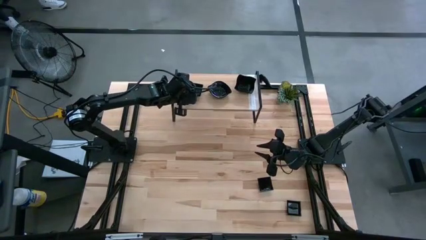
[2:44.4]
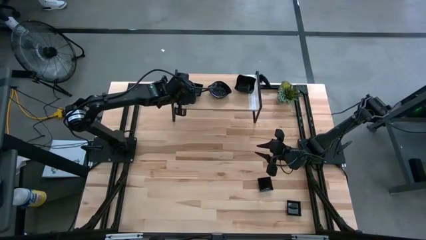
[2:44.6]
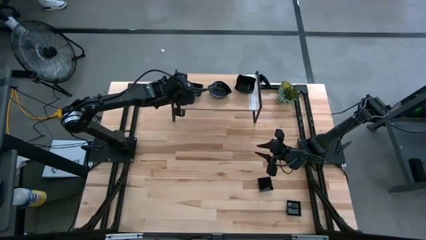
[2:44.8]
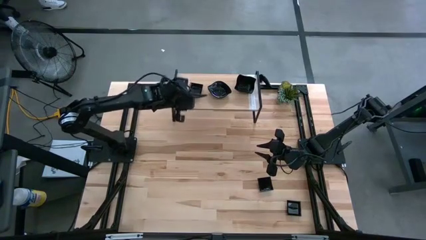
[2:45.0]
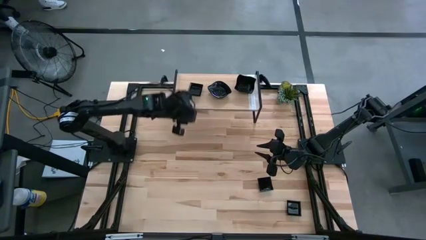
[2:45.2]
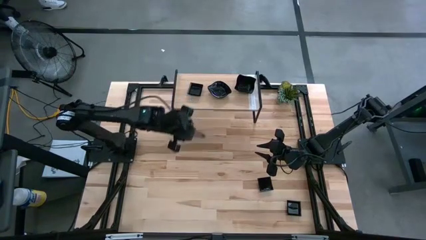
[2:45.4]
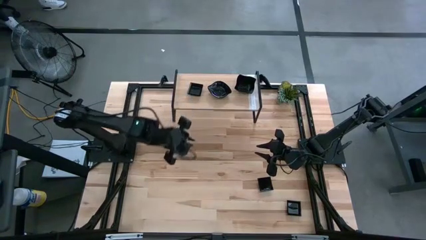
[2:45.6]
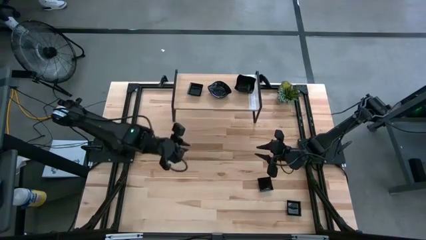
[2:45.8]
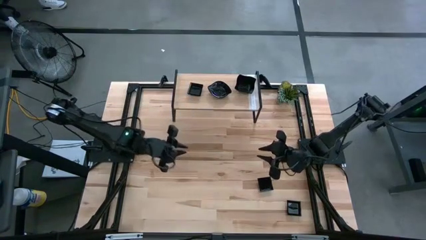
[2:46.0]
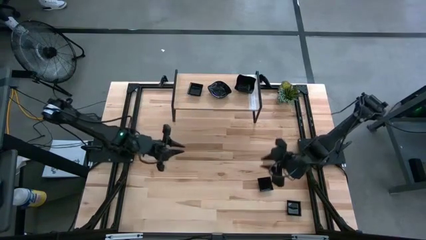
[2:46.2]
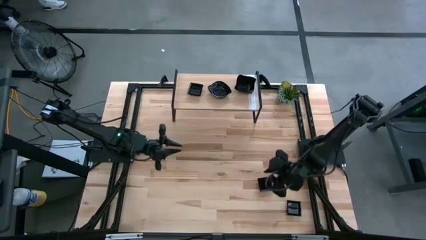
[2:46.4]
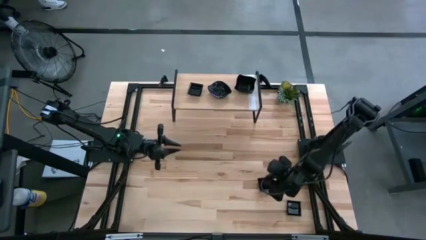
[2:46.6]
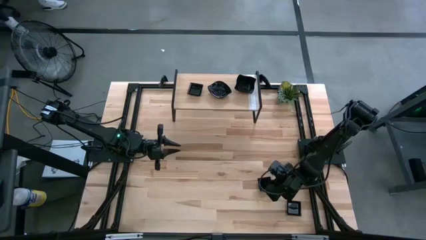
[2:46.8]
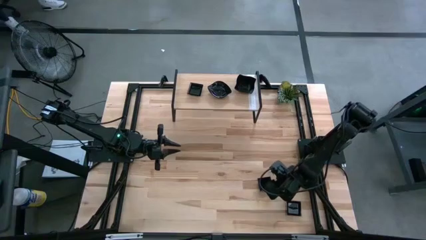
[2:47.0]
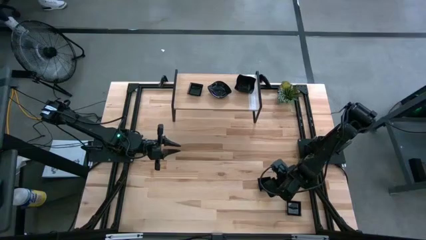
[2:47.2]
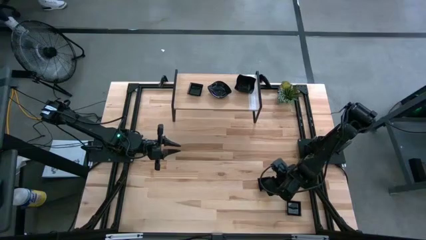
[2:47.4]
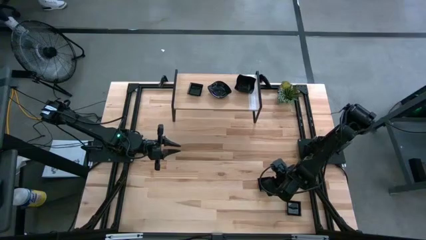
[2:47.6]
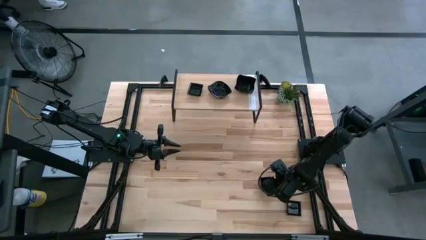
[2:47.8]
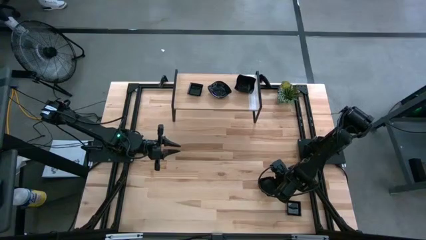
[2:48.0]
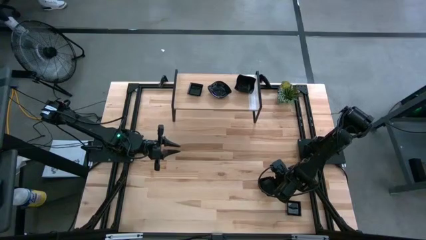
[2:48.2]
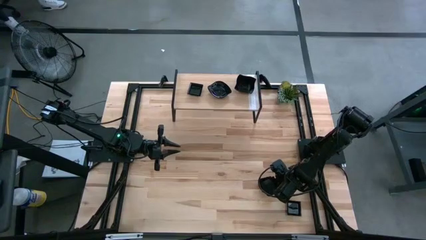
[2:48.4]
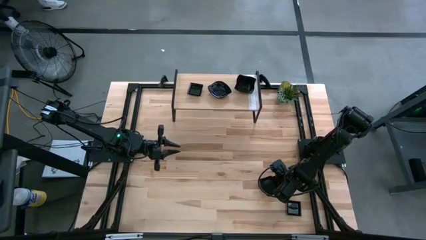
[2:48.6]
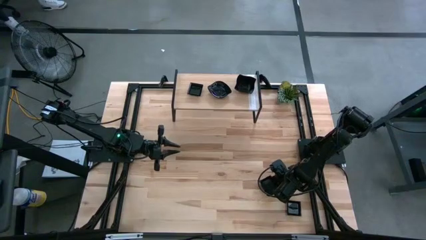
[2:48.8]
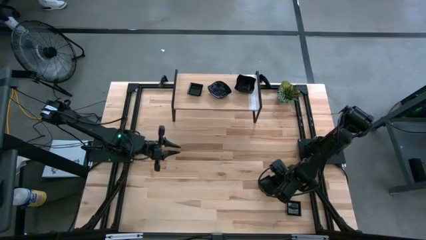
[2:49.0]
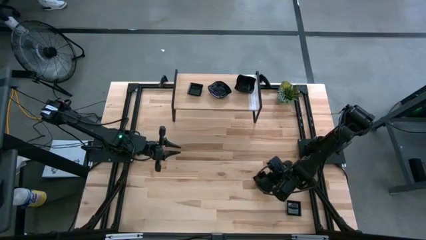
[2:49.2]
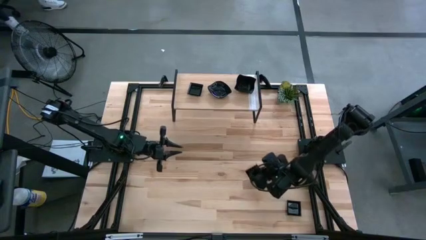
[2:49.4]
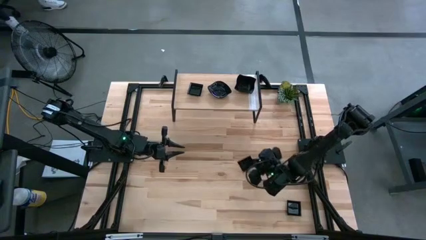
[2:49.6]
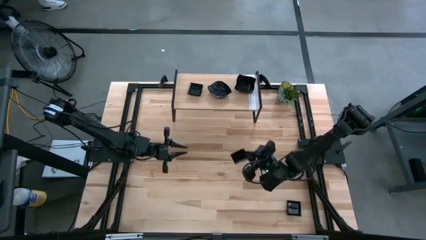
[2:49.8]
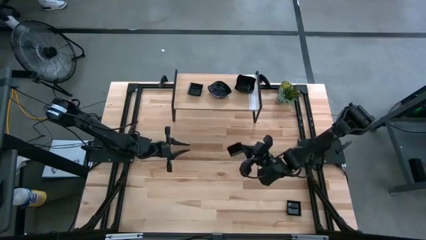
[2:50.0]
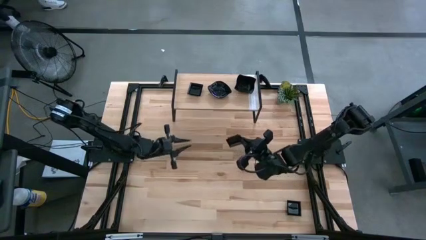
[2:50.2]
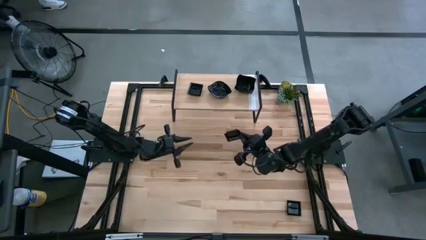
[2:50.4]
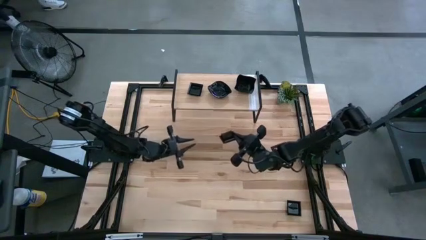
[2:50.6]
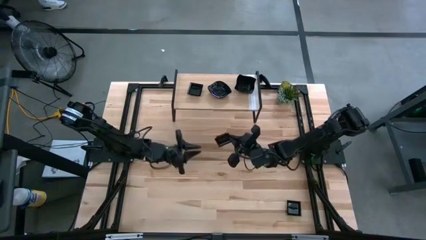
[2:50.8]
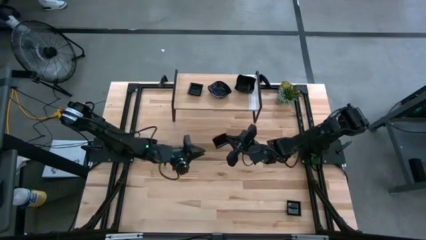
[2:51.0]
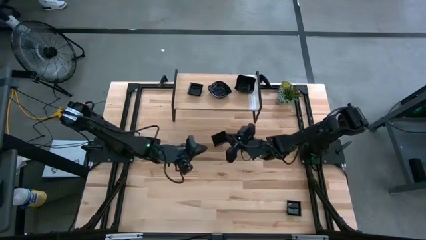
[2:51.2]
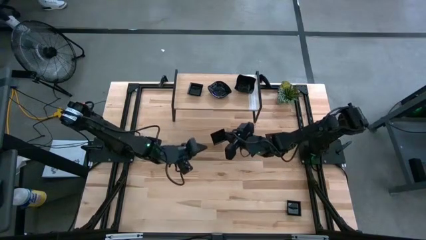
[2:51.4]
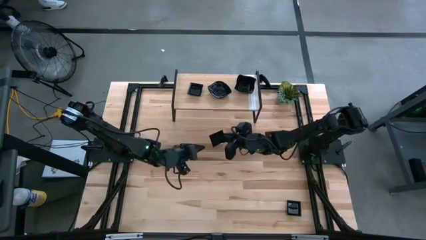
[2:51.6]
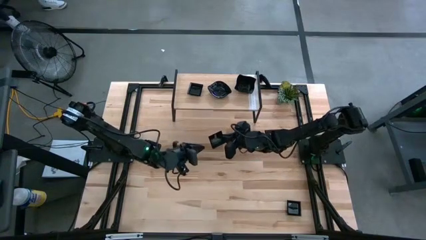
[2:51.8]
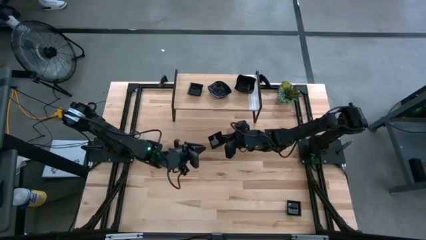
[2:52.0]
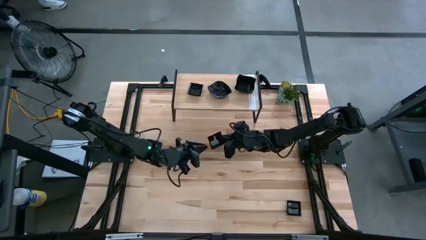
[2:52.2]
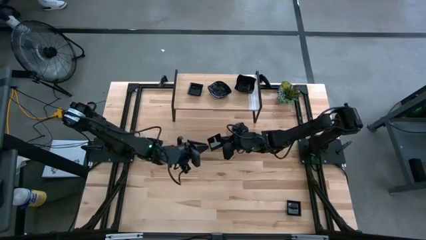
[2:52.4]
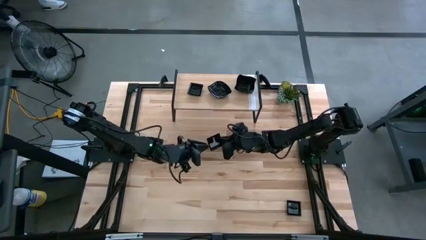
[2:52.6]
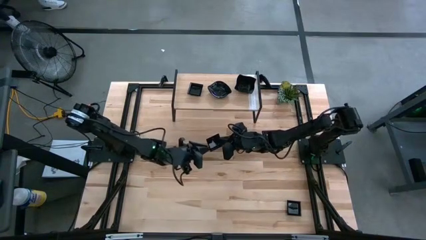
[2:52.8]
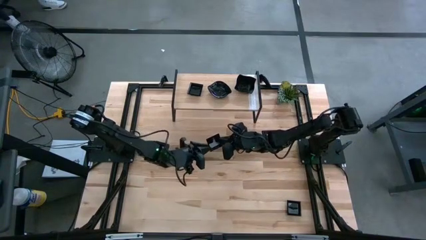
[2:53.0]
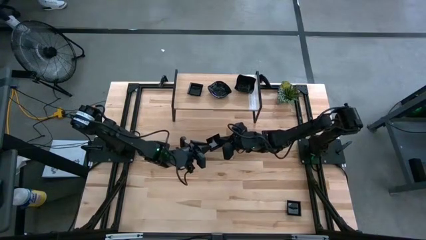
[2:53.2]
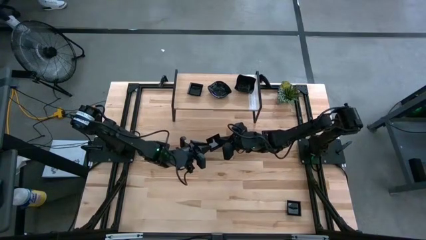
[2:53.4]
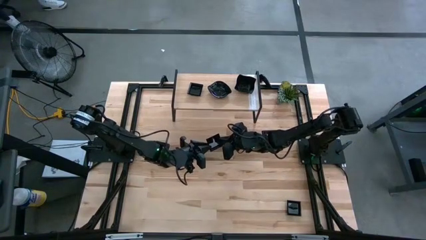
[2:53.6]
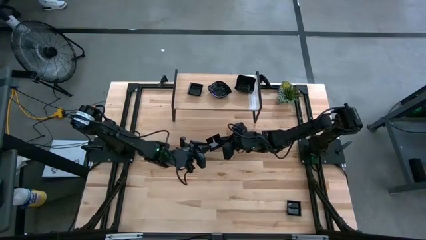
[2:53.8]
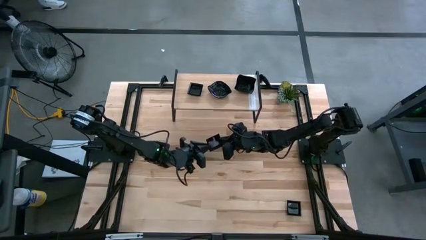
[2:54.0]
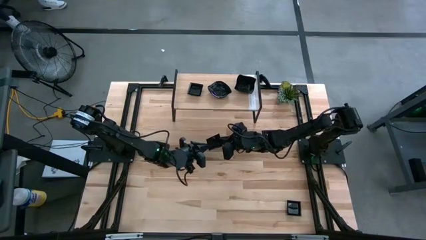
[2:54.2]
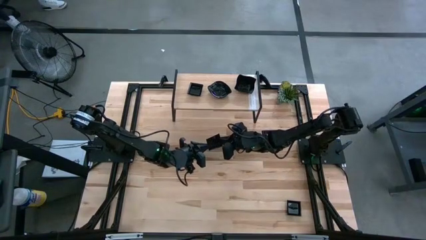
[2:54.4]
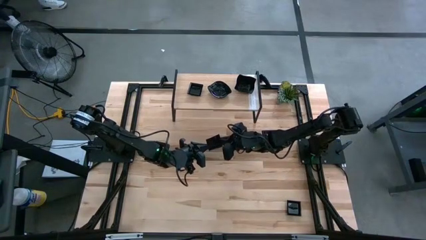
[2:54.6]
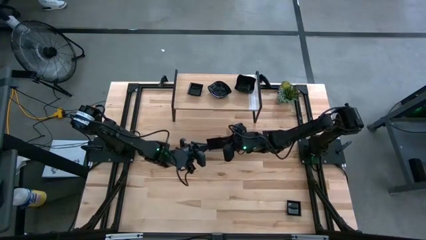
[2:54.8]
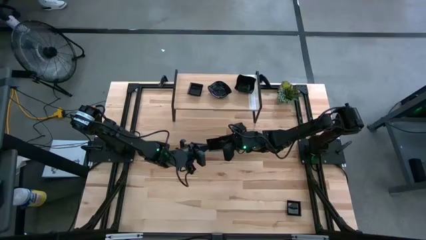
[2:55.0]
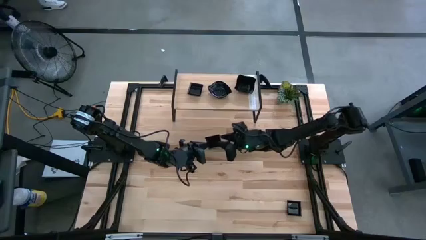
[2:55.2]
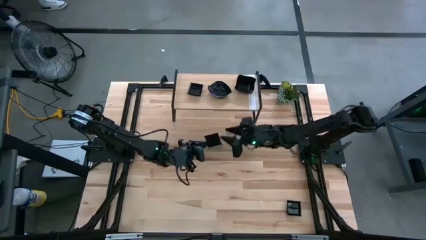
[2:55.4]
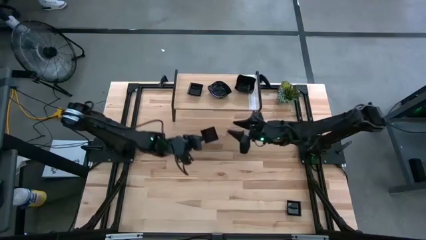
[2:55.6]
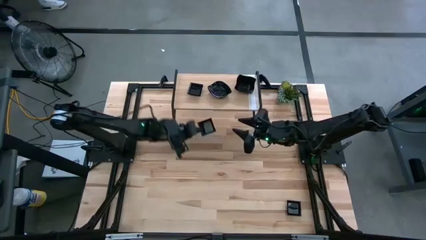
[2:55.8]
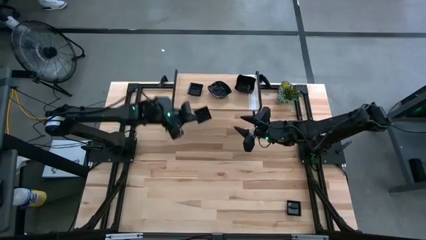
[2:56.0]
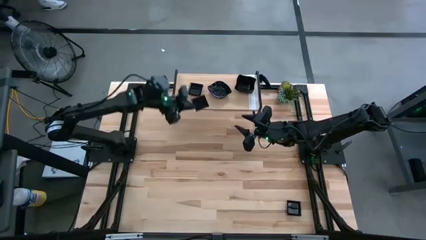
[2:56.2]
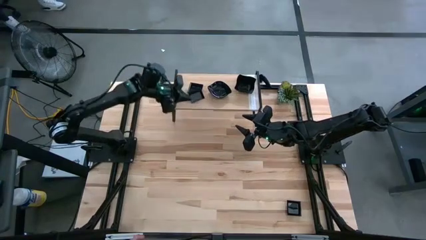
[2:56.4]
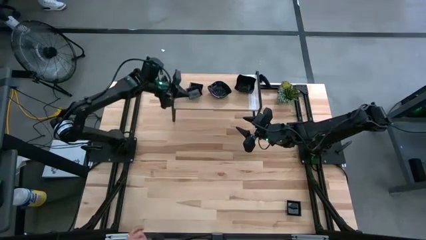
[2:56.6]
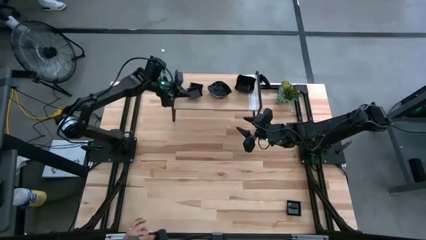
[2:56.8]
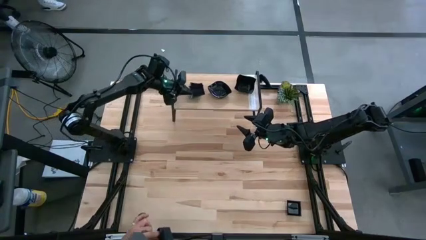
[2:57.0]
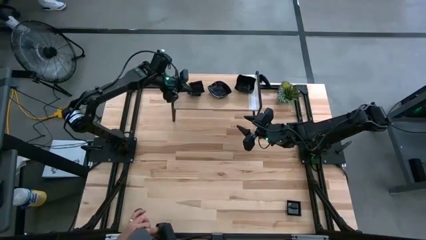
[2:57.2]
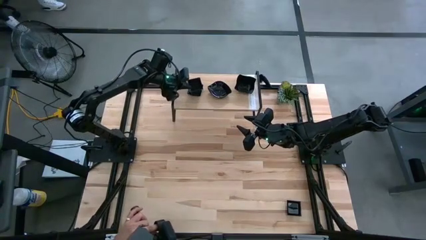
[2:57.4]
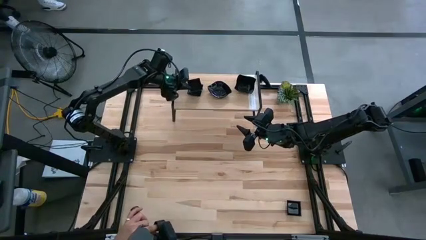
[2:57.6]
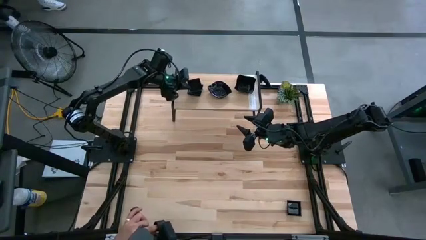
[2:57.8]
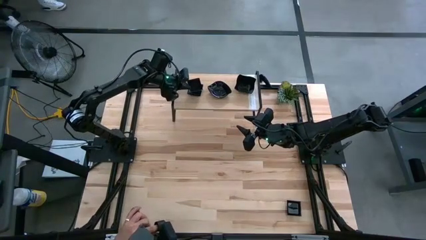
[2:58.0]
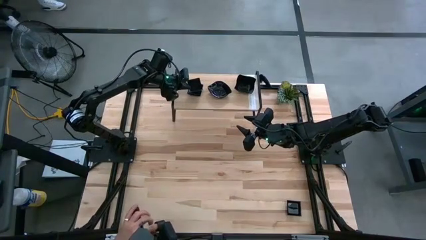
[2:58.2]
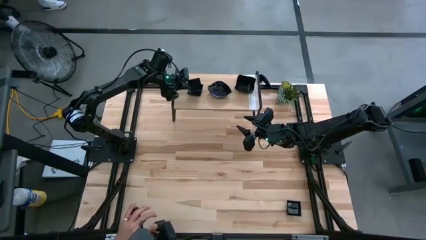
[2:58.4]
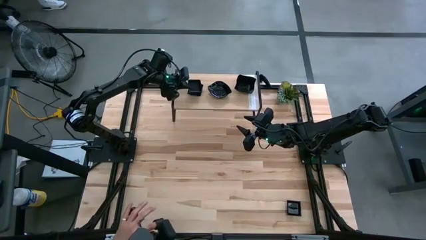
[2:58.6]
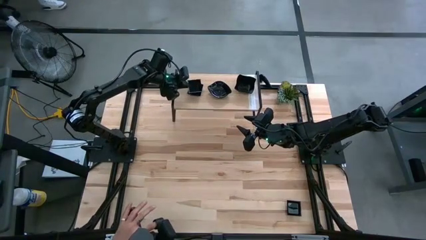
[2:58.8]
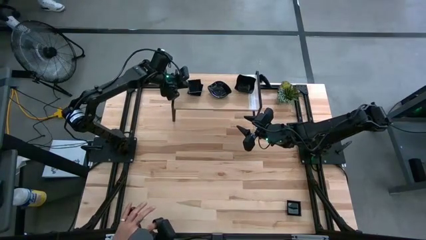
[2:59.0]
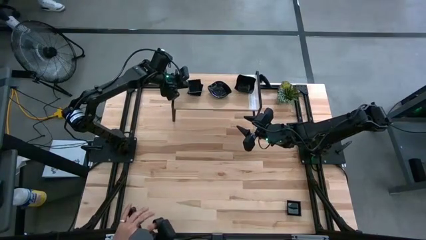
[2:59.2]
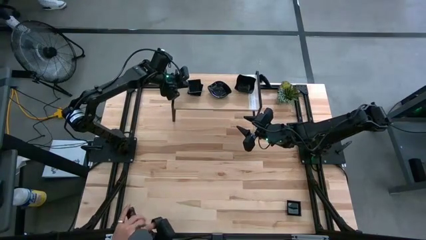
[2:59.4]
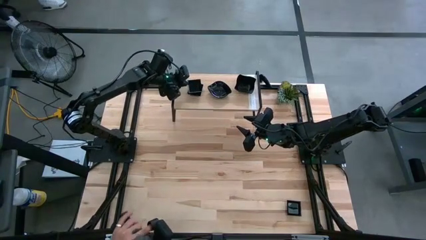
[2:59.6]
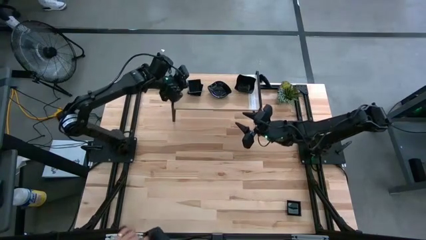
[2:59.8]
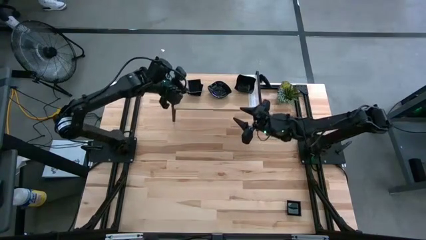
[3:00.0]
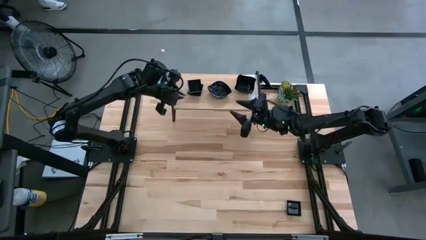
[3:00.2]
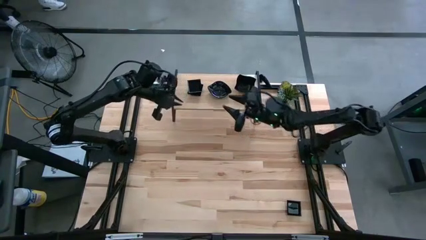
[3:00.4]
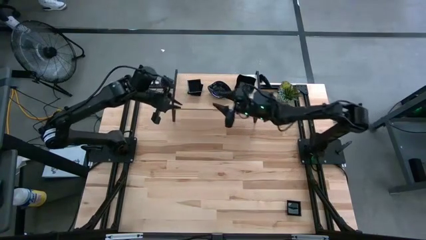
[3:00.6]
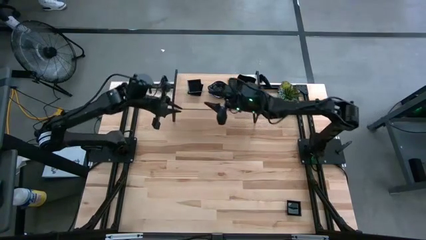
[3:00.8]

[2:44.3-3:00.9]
Task: Pick & Place Mini shaped plates
Stack the square plate on top of the other square plates on the shelf
